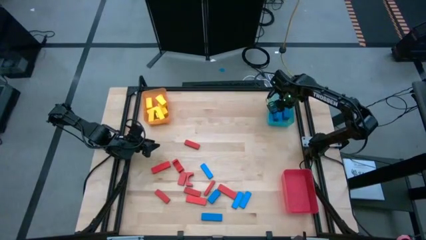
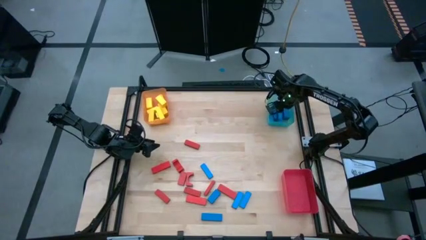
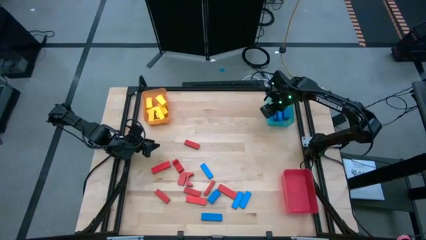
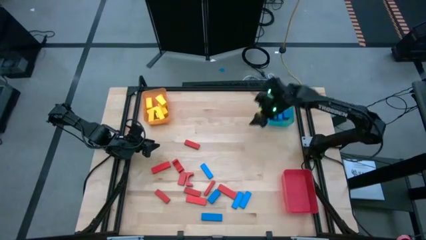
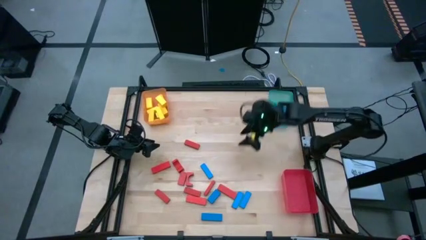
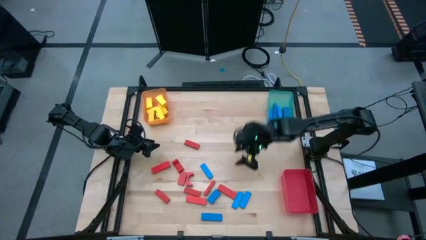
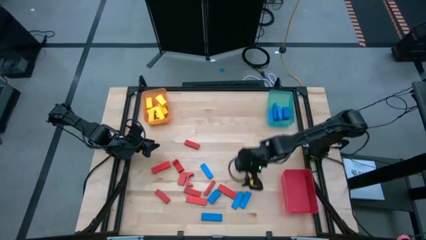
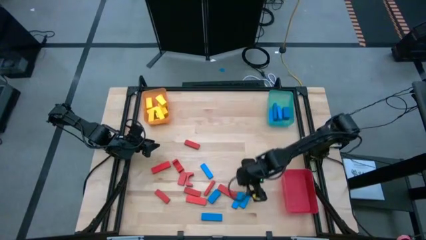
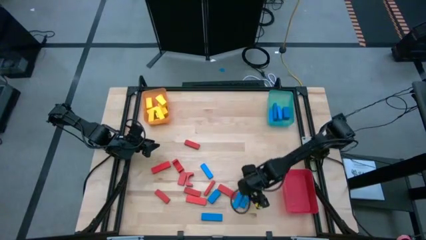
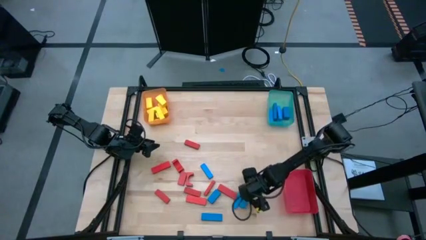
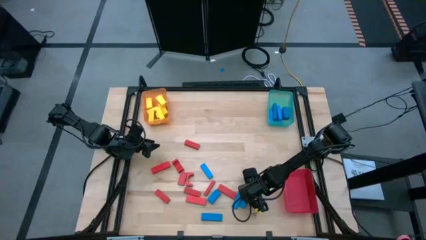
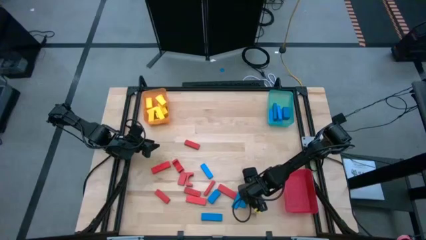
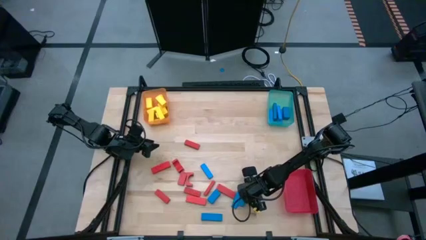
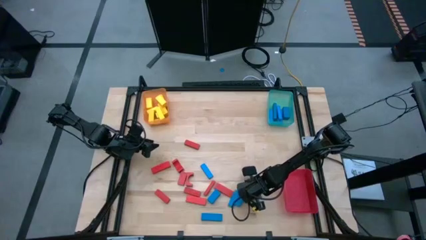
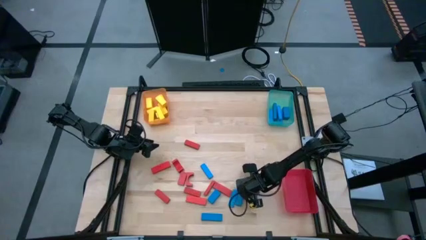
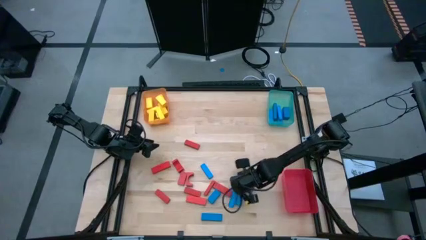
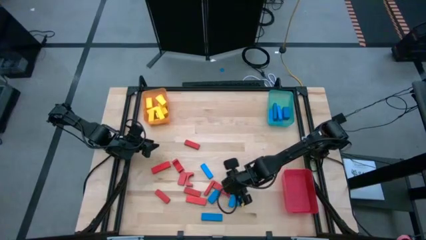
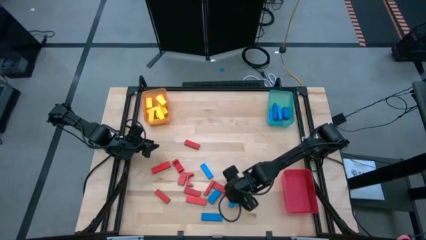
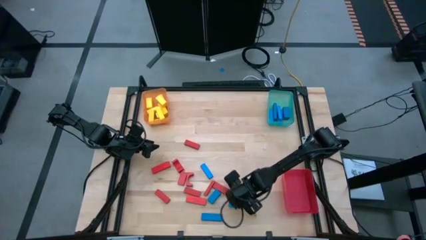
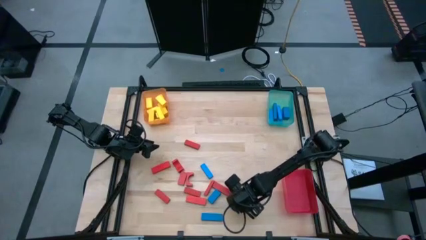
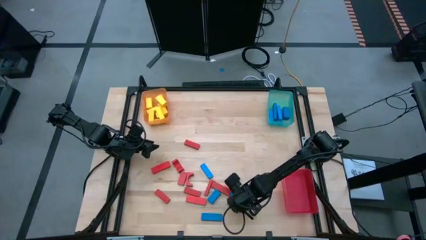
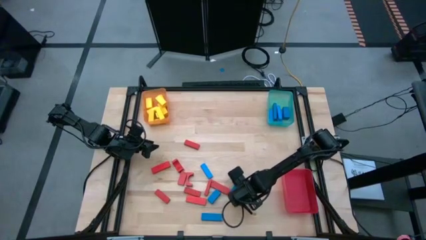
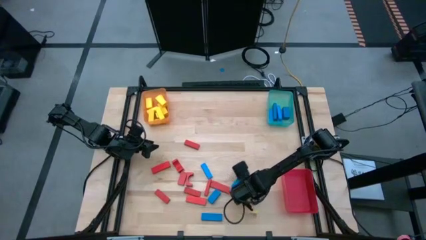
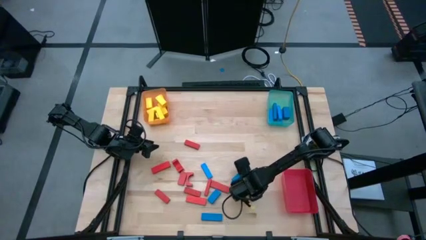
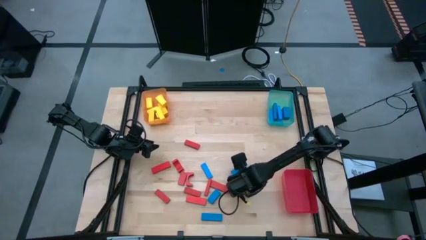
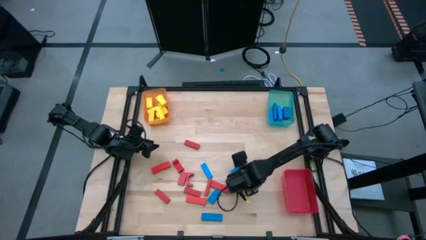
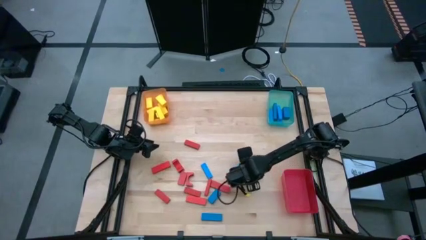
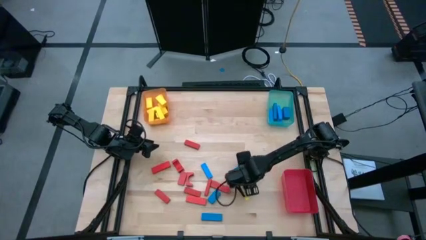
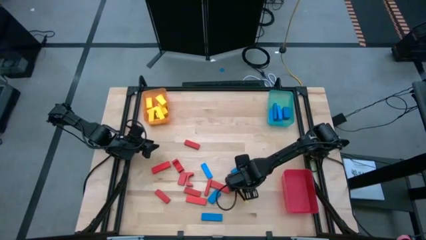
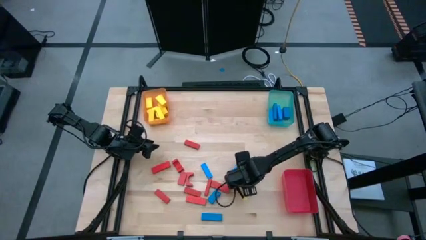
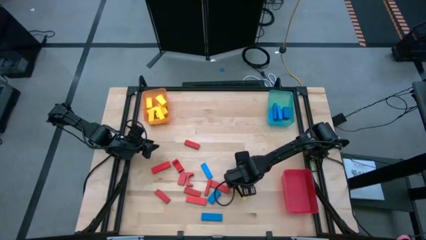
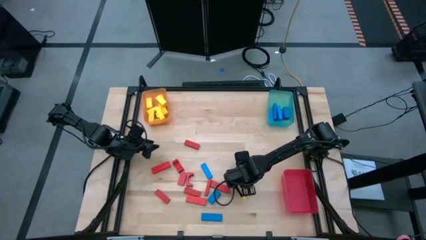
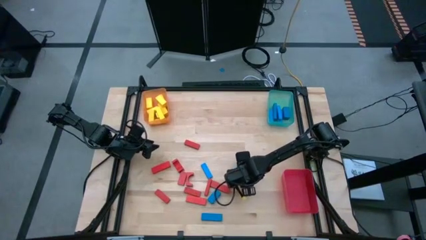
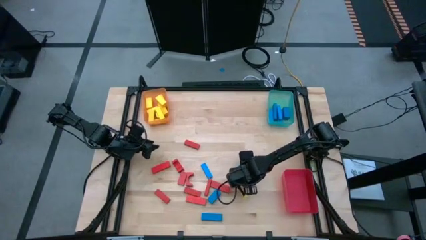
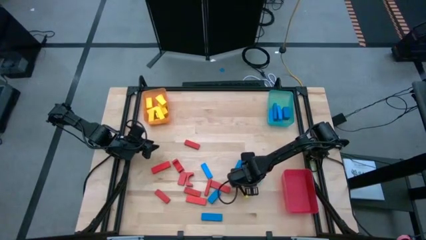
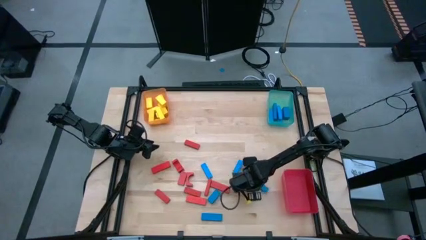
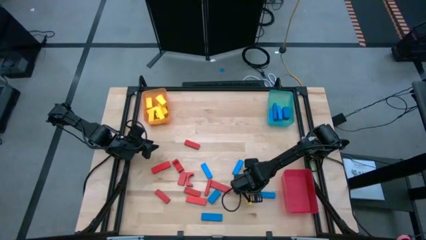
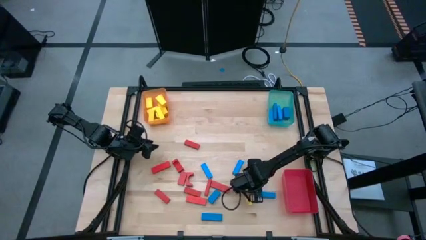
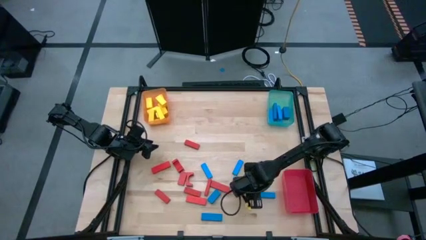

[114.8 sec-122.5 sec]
Task: Sort blocks
Put the blue block into the blue bin

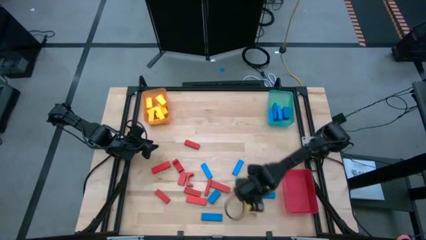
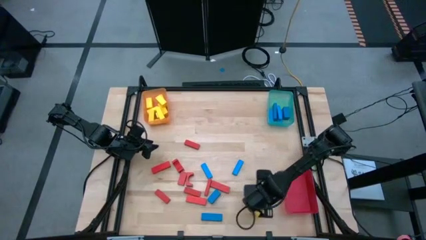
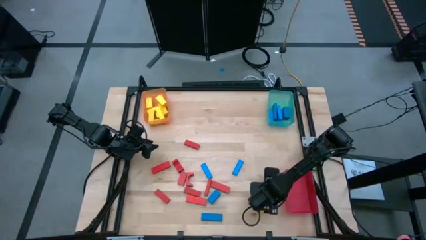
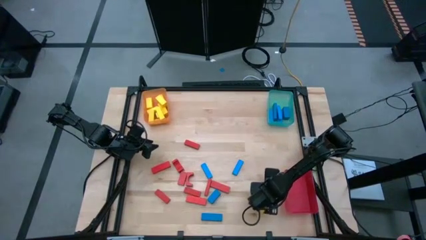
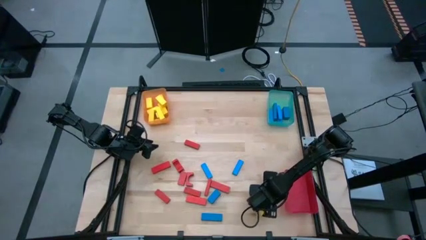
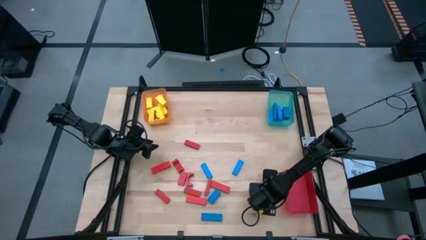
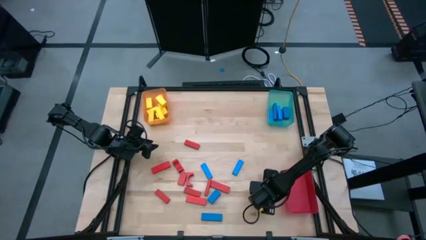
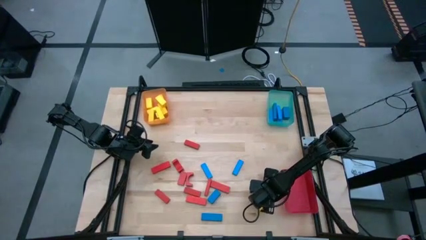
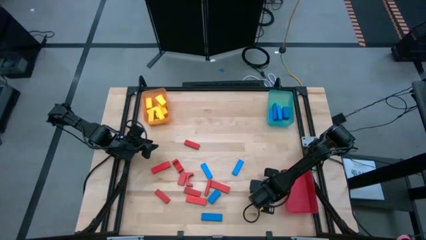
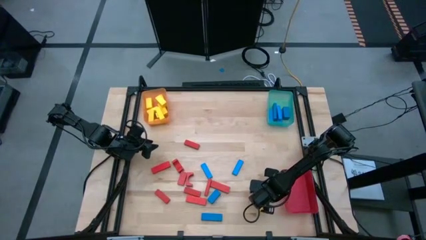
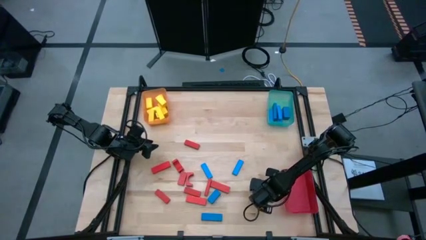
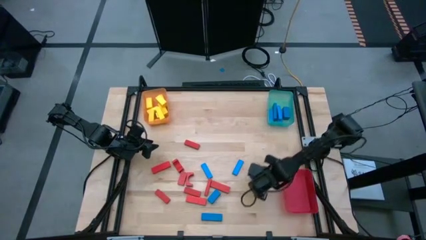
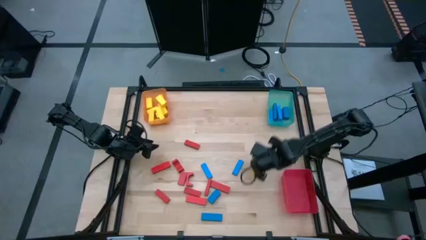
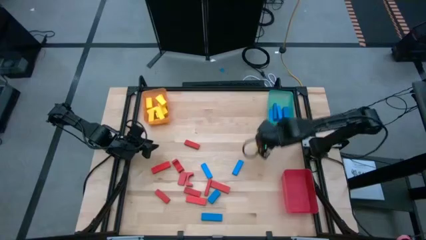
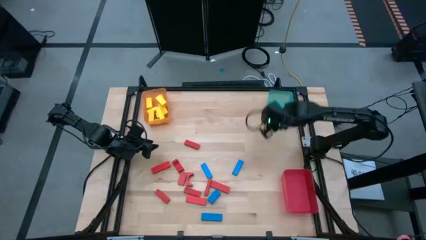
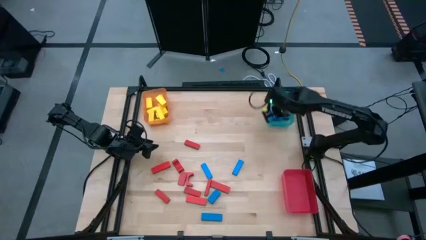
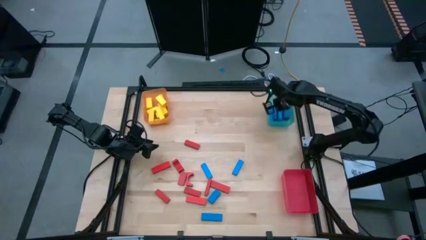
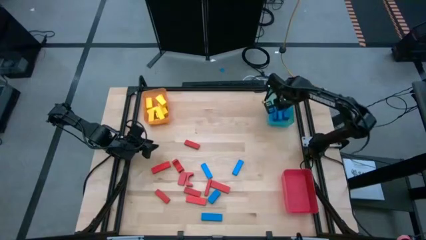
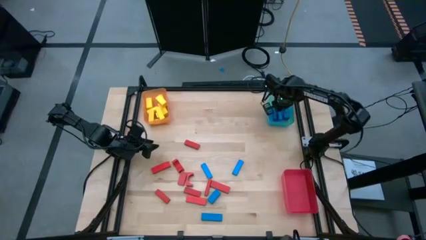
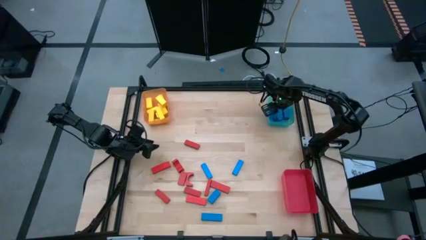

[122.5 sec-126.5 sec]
Put the blue block into the blue bin
